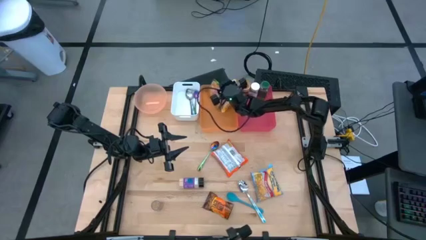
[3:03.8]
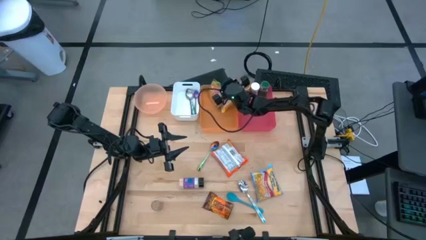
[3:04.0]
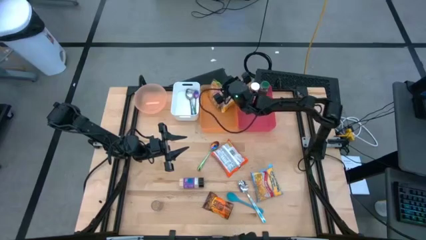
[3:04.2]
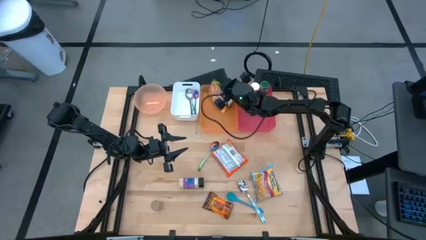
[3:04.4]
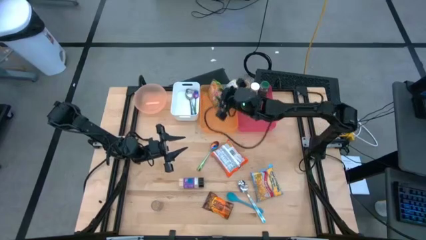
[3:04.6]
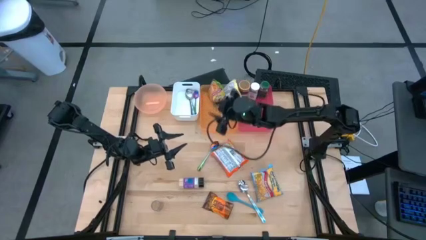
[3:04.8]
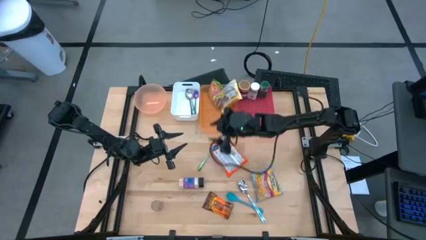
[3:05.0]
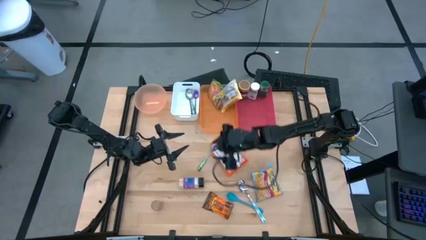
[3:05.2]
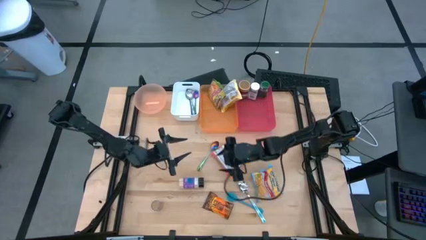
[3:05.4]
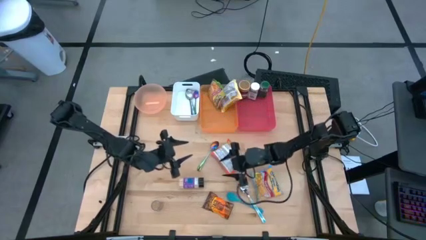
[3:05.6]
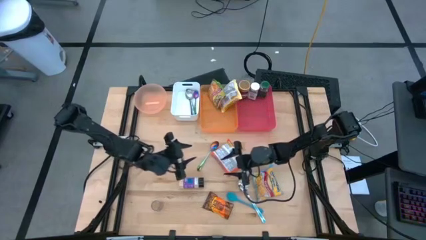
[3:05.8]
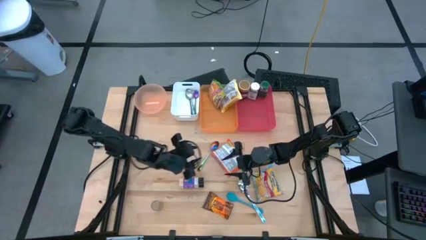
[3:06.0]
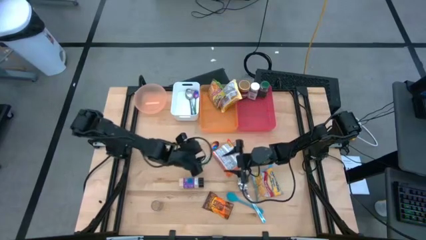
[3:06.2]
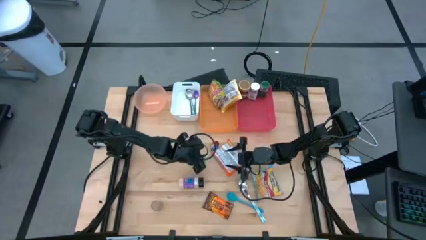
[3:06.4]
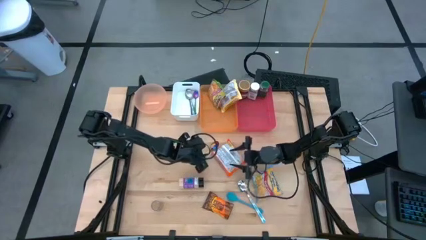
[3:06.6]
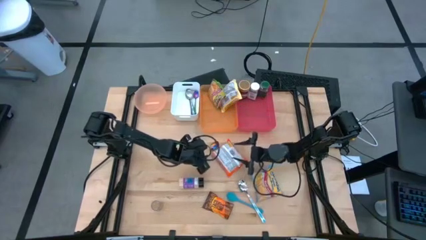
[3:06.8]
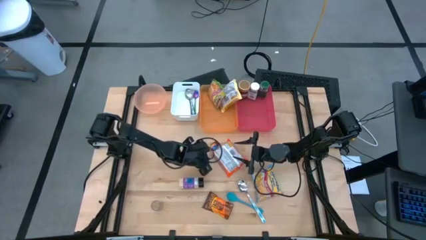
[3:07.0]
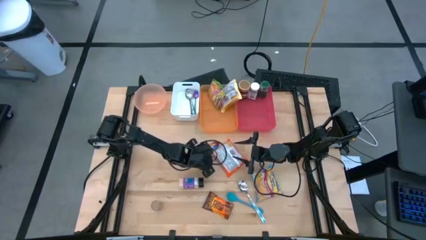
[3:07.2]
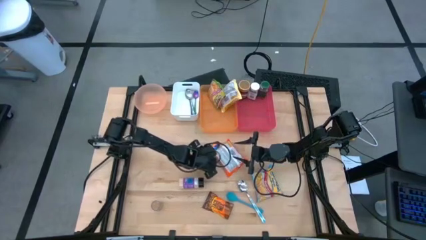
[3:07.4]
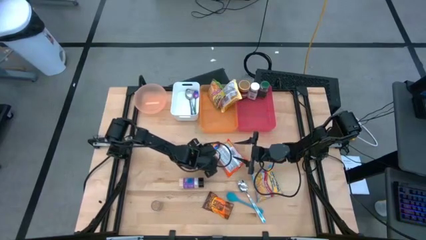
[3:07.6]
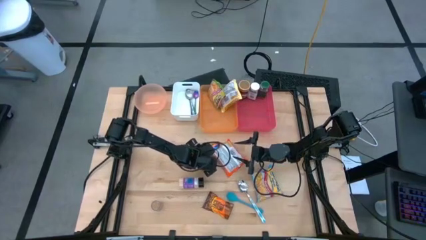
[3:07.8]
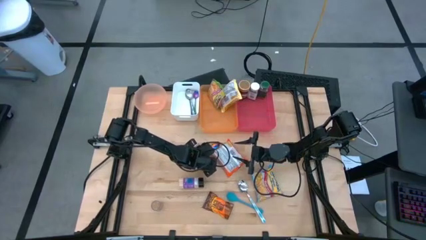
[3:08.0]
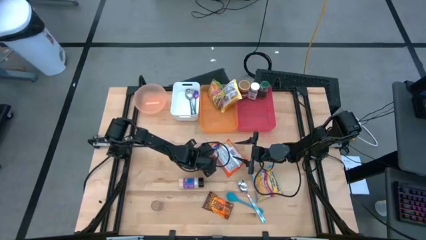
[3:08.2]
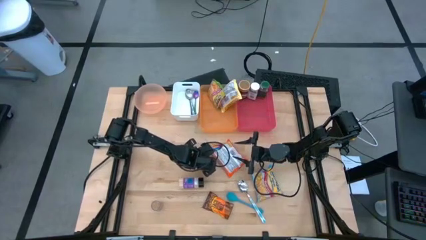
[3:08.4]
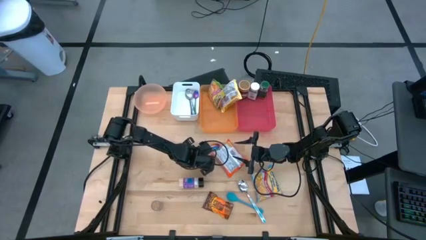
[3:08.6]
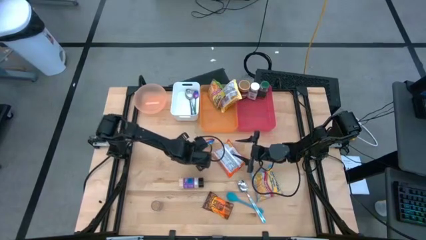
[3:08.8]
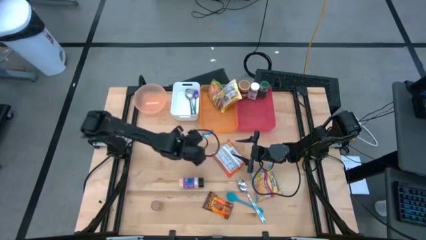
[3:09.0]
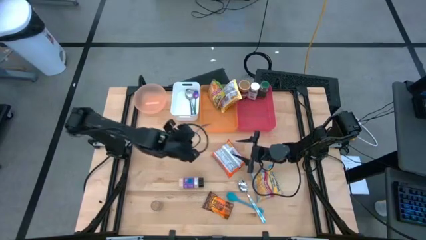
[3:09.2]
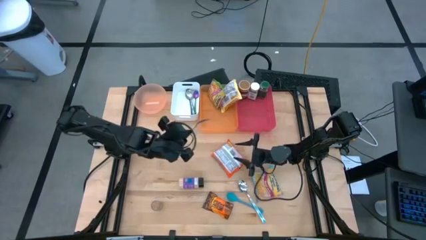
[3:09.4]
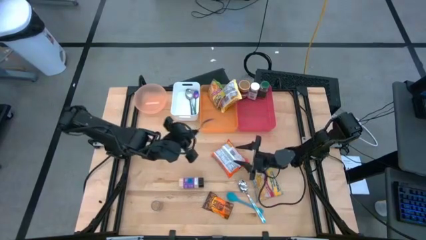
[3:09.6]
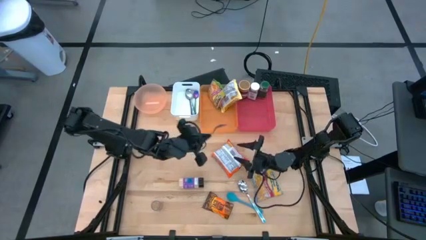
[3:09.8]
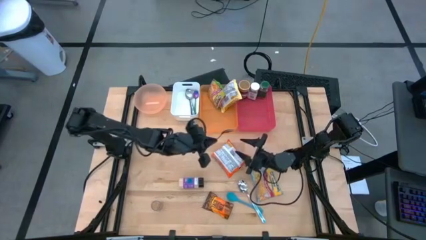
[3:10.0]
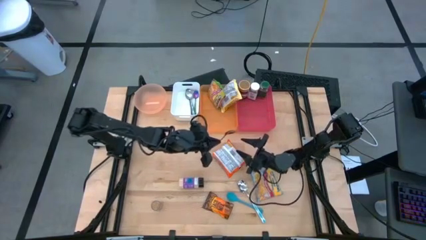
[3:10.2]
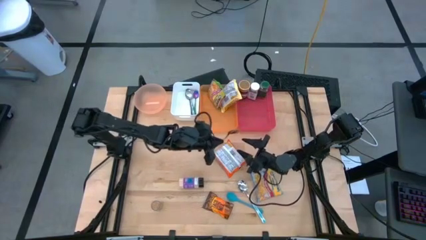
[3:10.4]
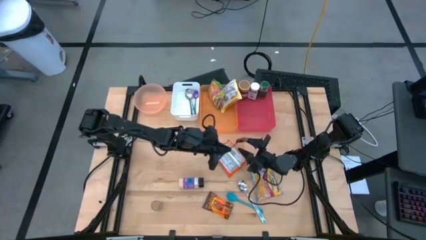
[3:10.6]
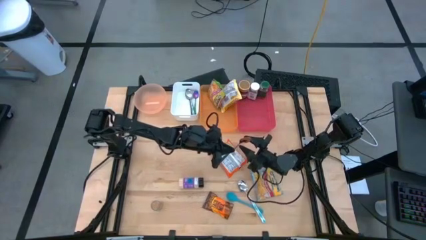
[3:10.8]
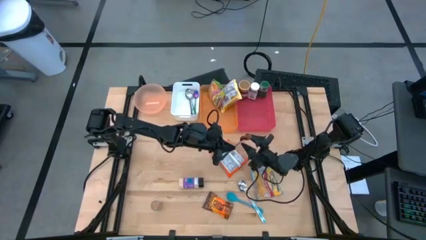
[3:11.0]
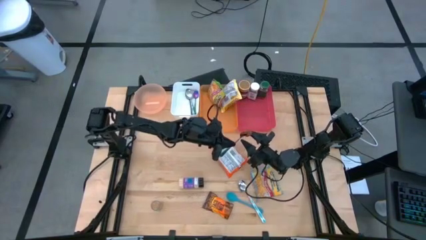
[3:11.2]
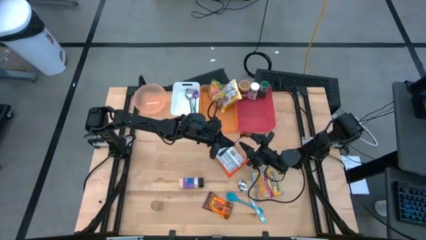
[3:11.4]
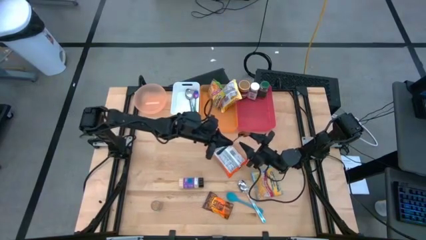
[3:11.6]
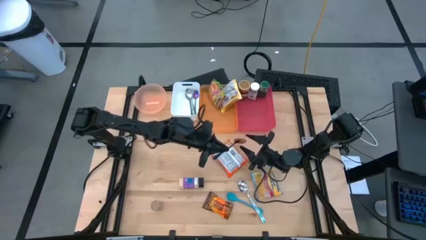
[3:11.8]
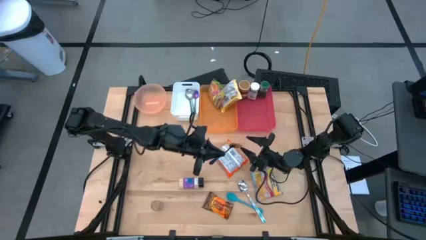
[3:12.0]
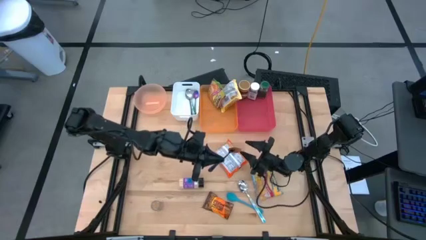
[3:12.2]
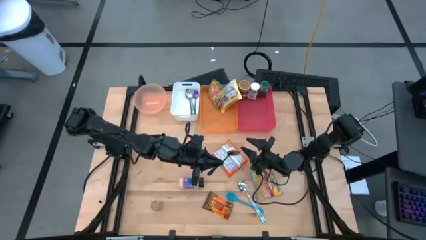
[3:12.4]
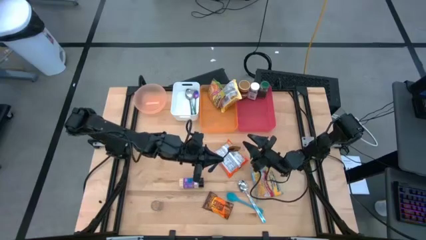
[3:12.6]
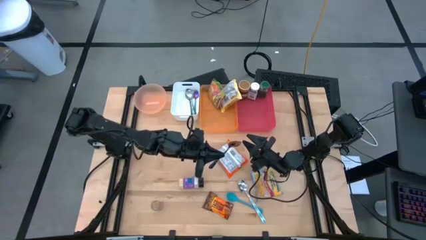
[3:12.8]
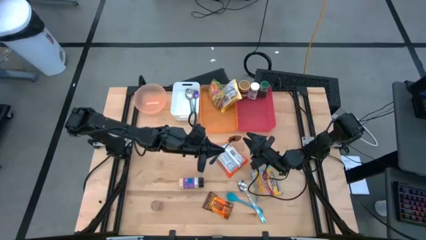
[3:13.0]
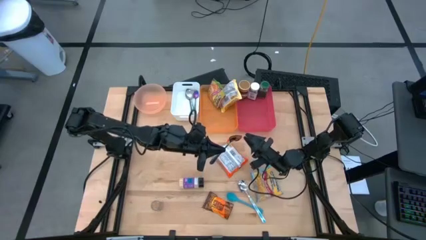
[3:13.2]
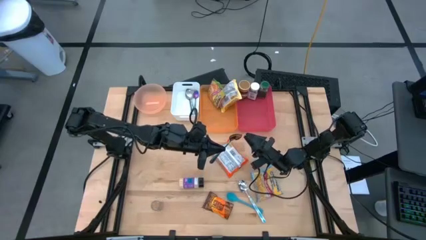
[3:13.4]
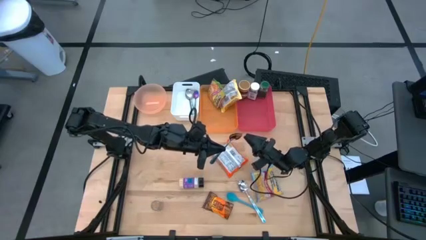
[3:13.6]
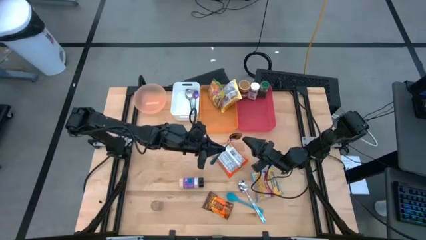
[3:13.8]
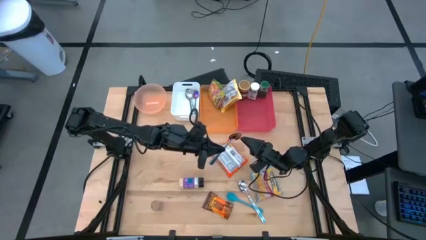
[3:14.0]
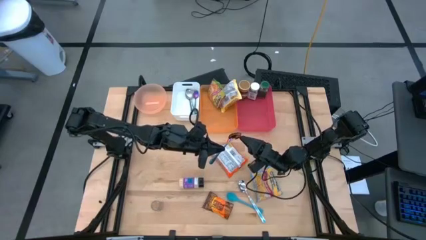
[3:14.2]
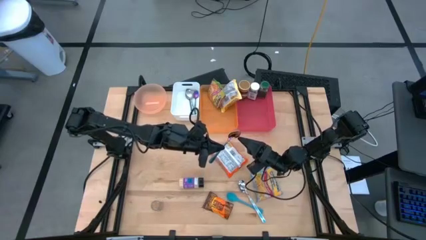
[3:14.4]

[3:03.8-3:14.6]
Task: Pick & Place Food Item
Put the purple blue spoon into the white bin

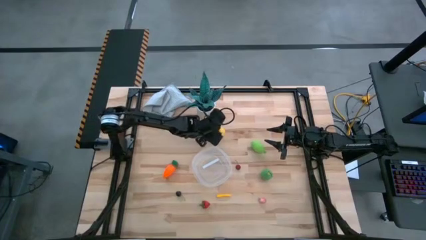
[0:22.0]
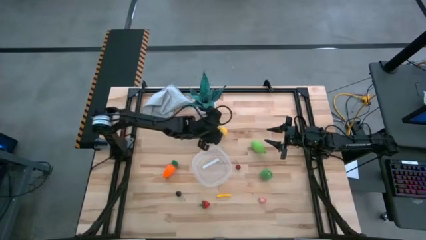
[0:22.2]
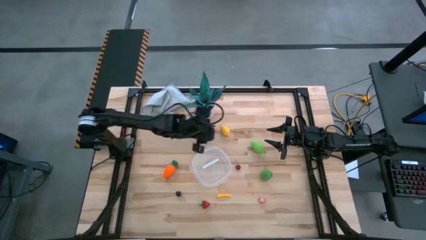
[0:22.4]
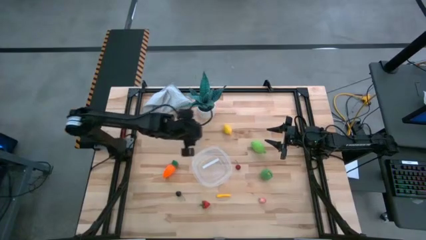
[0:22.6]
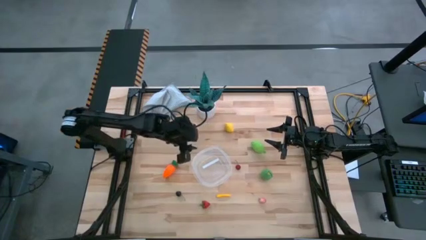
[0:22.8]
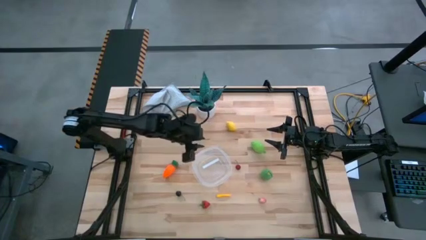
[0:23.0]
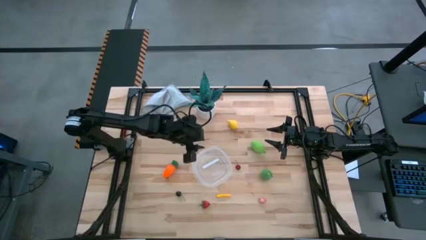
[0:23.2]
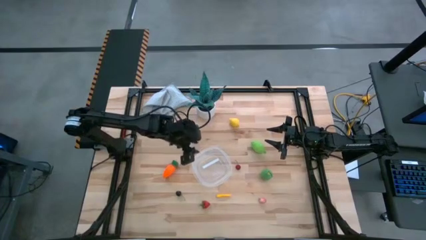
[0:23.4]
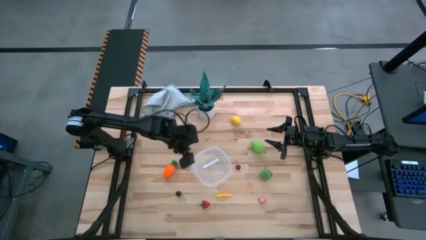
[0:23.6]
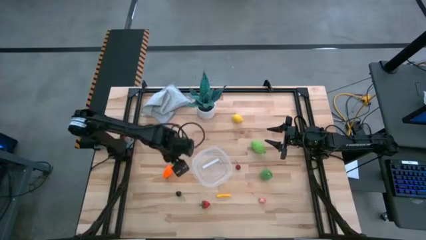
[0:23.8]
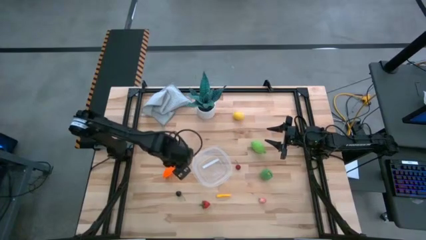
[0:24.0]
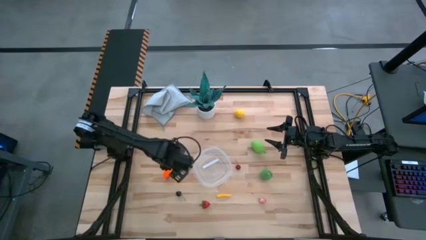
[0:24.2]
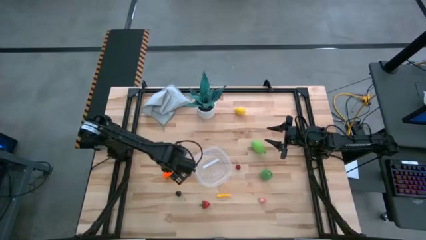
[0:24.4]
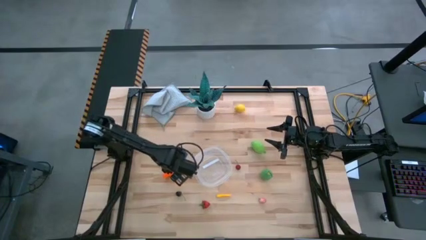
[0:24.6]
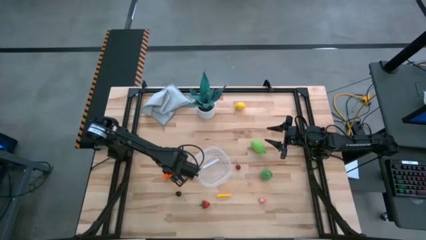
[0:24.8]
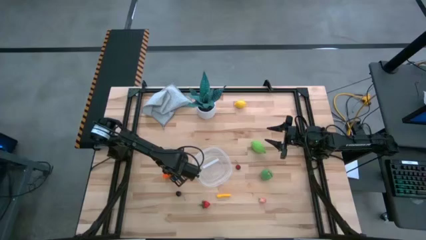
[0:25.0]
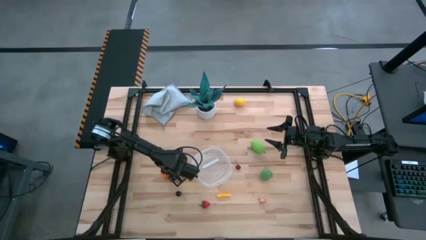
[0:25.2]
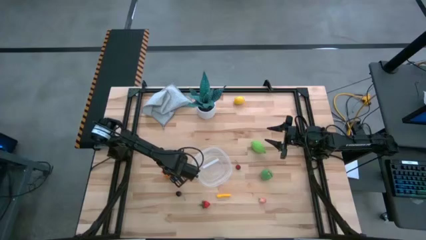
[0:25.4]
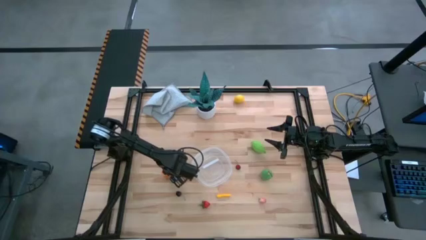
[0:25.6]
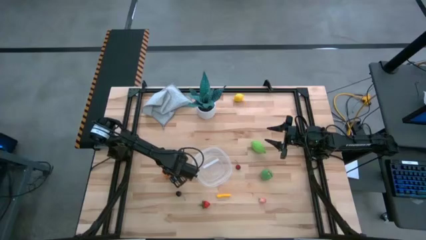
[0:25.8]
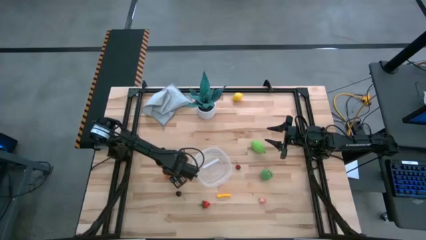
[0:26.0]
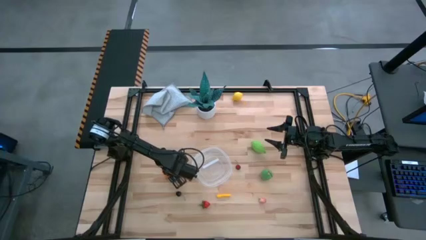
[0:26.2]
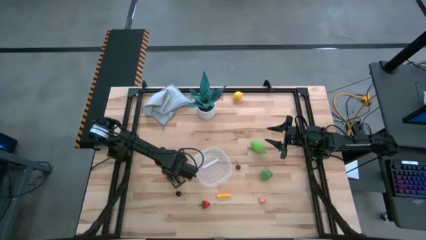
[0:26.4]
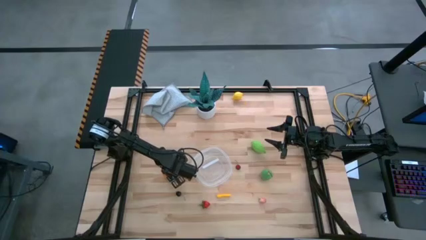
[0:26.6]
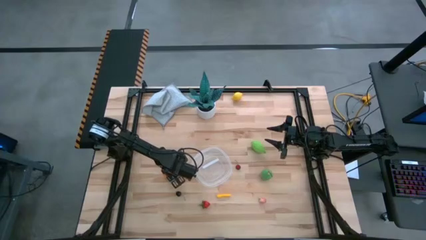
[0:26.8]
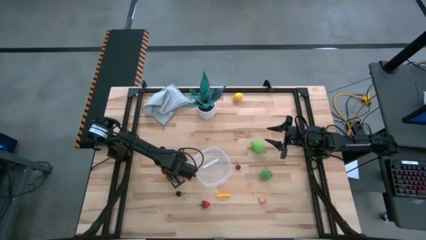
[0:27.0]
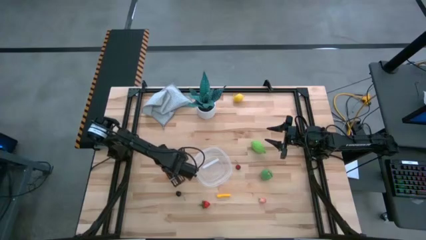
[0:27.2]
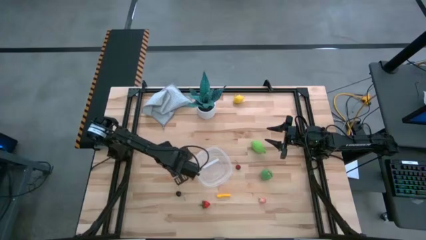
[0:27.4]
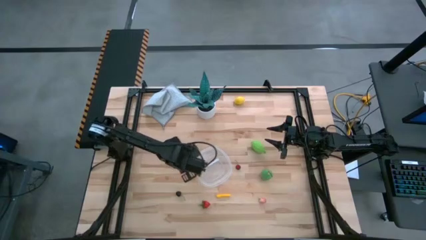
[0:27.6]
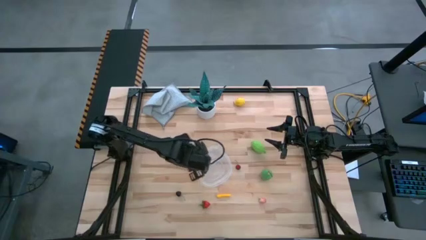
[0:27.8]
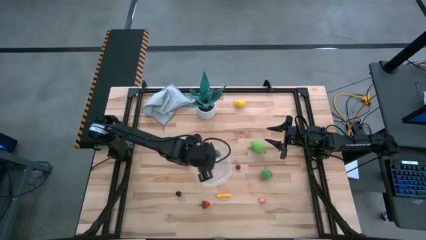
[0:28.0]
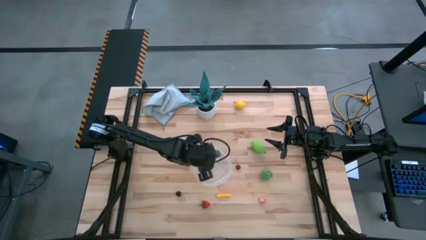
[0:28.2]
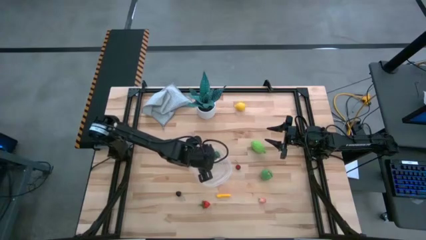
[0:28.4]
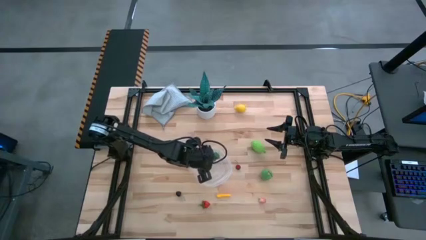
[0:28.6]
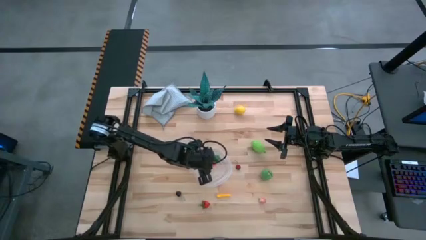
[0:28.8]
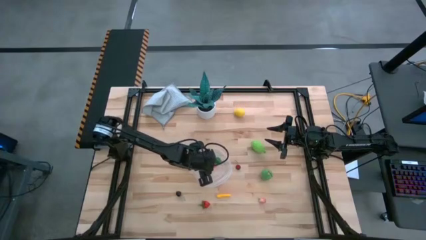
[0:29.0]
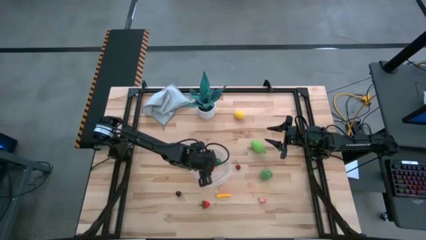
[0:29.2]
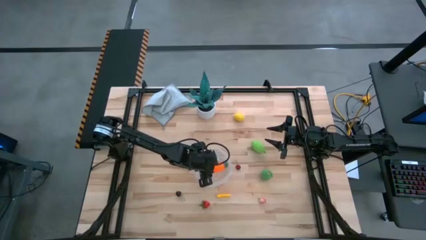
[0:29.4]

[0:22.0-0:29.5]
Task: Pick and placing Produce into tupperware
Put the carrot into the bin
